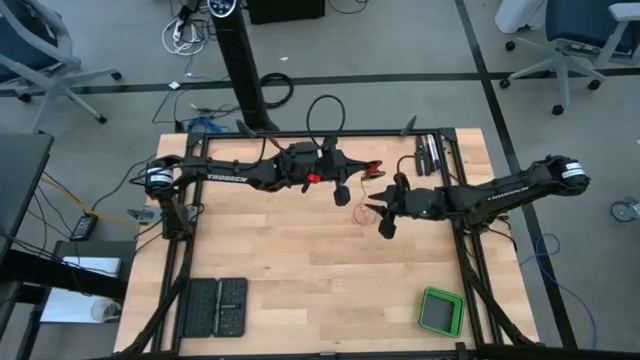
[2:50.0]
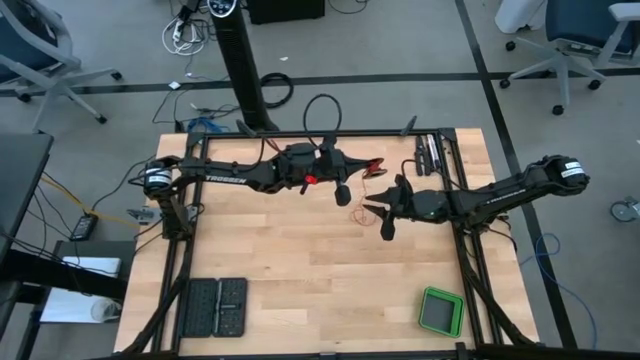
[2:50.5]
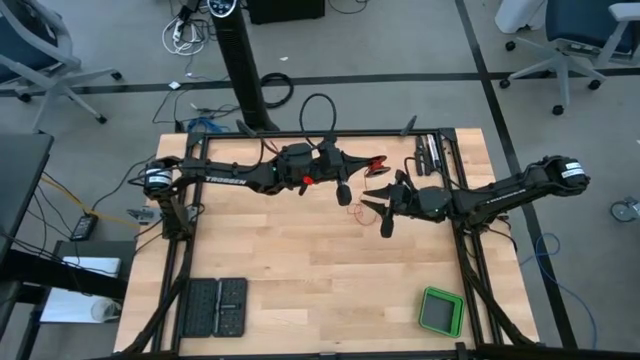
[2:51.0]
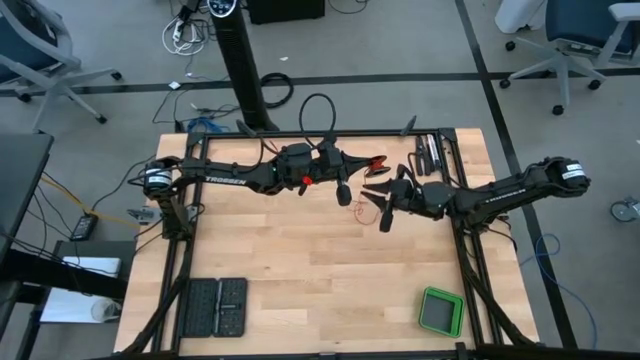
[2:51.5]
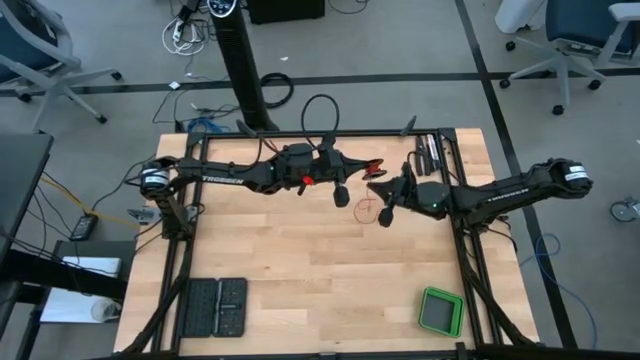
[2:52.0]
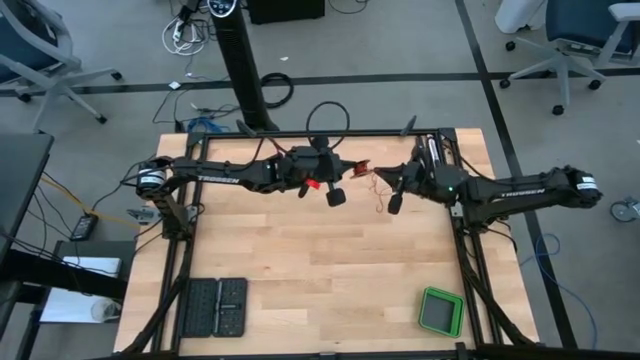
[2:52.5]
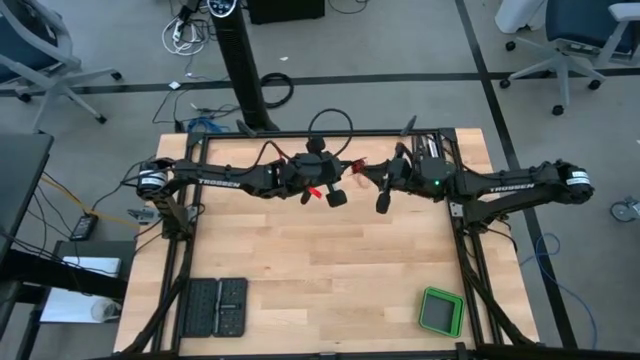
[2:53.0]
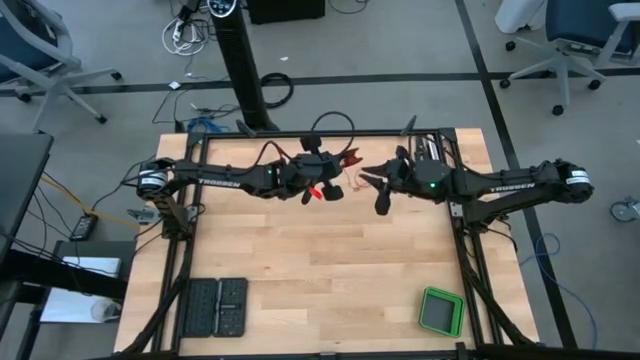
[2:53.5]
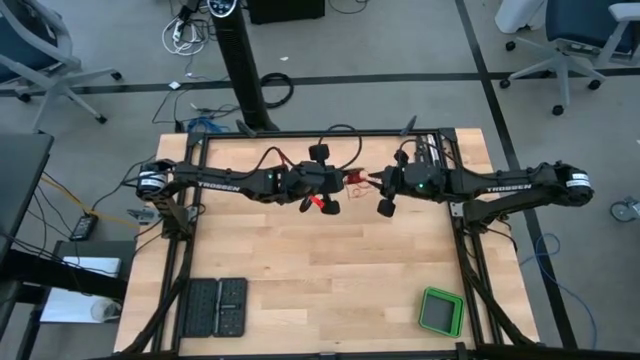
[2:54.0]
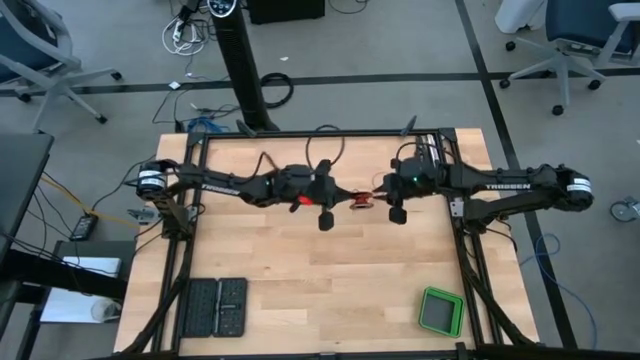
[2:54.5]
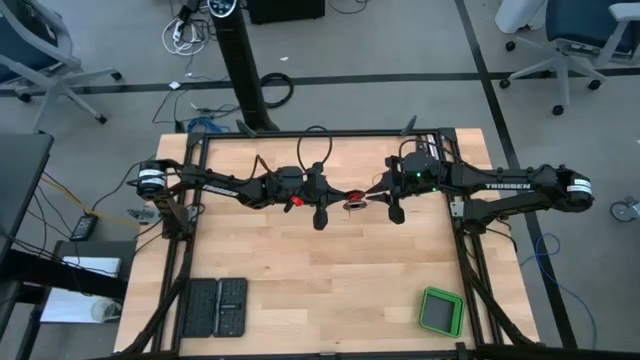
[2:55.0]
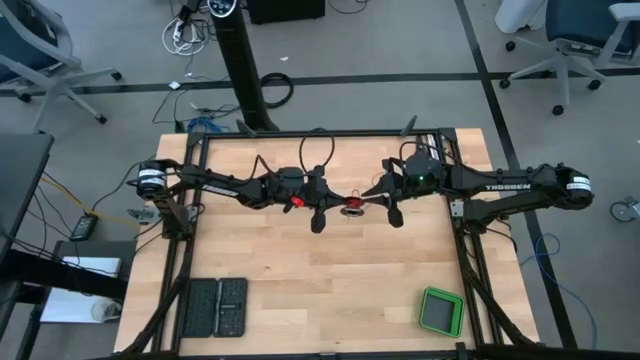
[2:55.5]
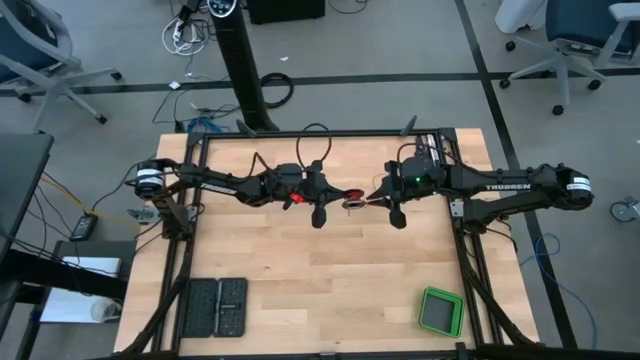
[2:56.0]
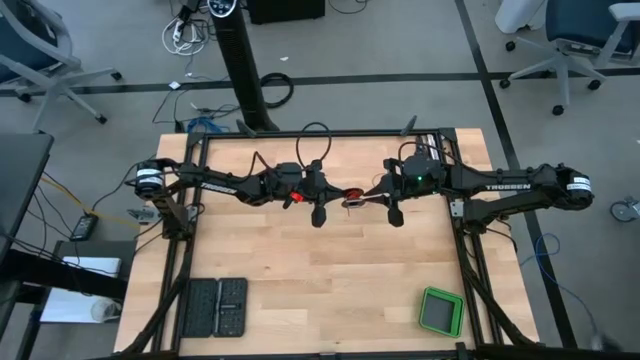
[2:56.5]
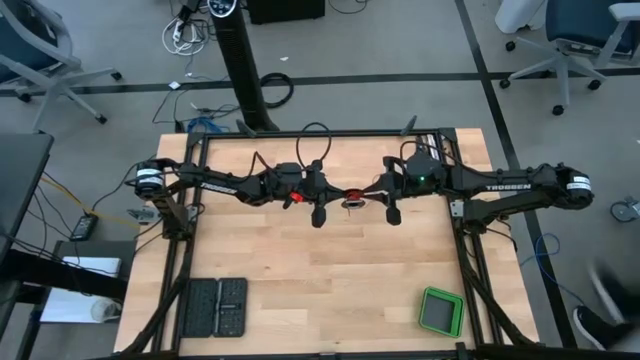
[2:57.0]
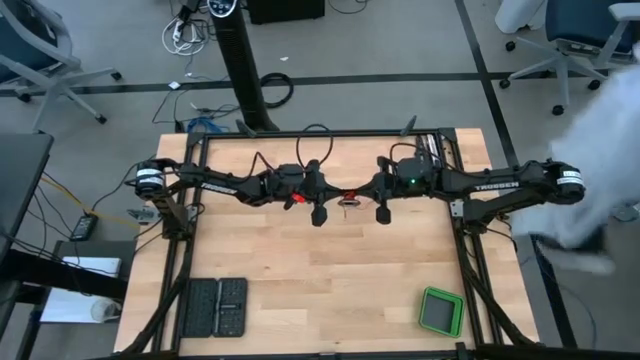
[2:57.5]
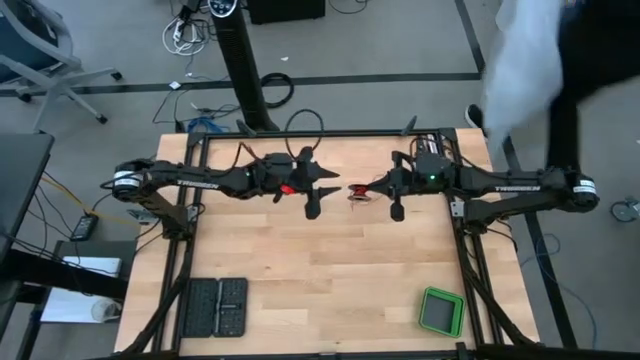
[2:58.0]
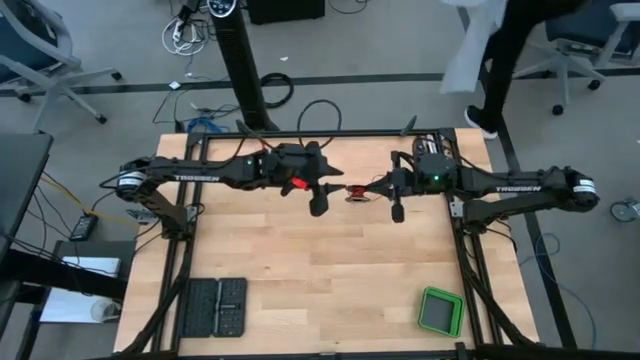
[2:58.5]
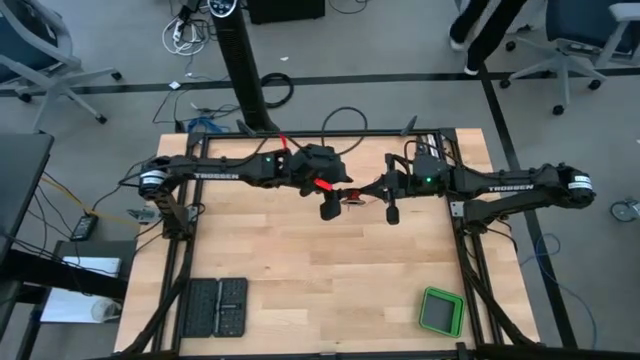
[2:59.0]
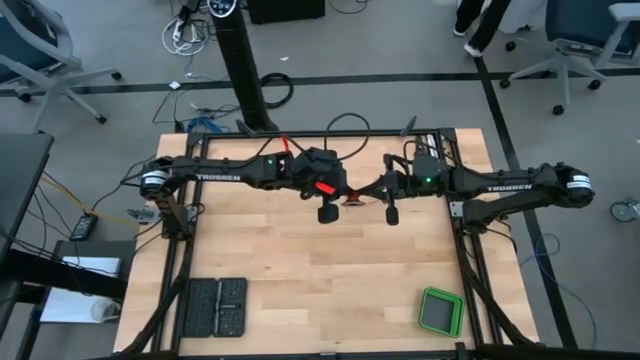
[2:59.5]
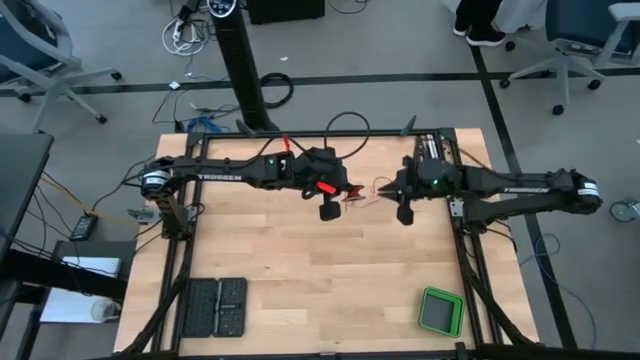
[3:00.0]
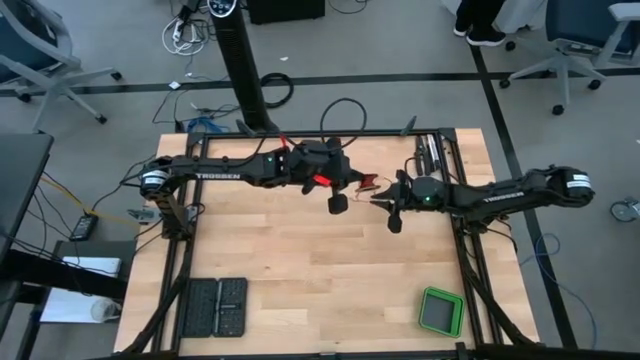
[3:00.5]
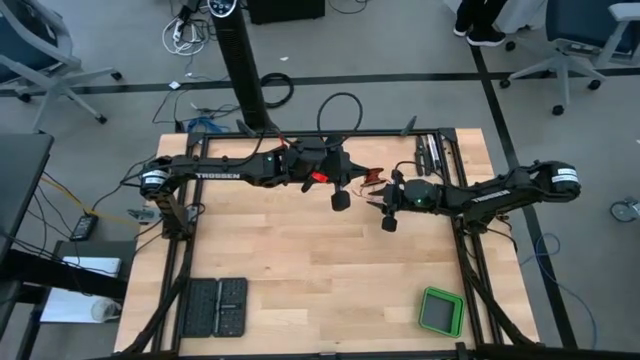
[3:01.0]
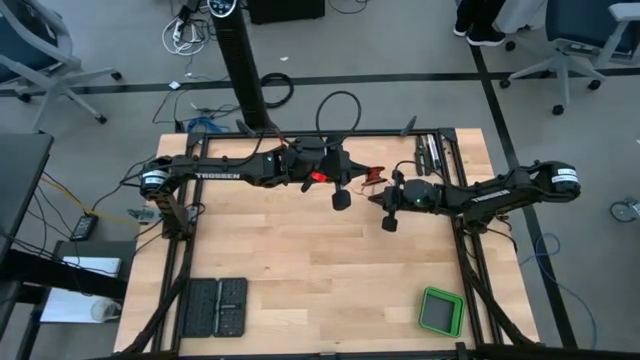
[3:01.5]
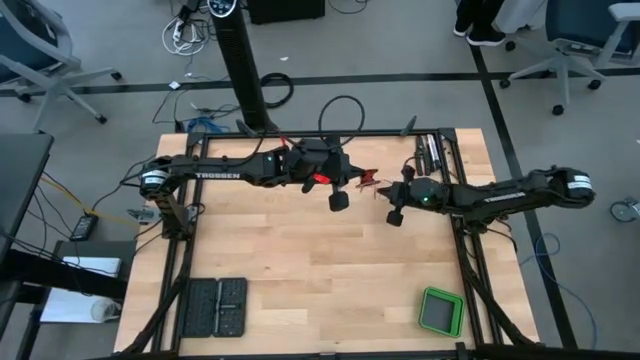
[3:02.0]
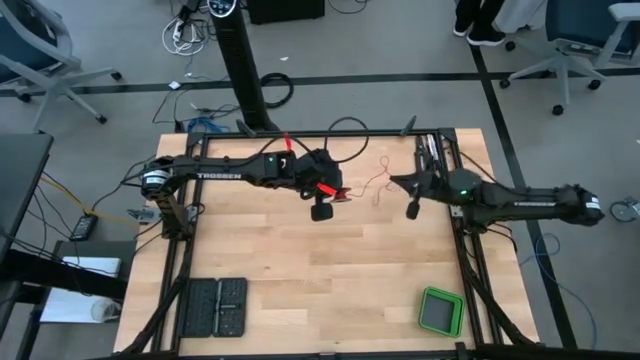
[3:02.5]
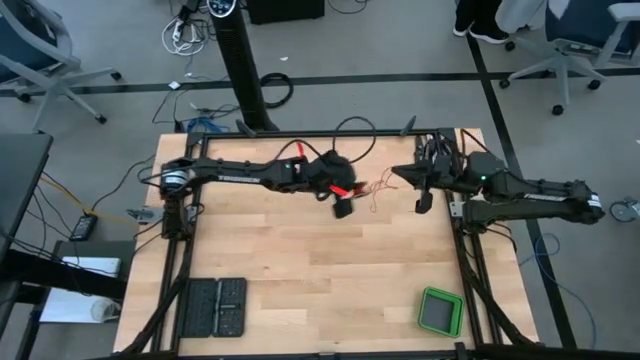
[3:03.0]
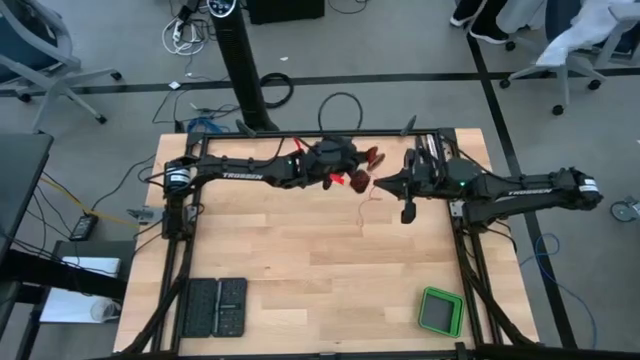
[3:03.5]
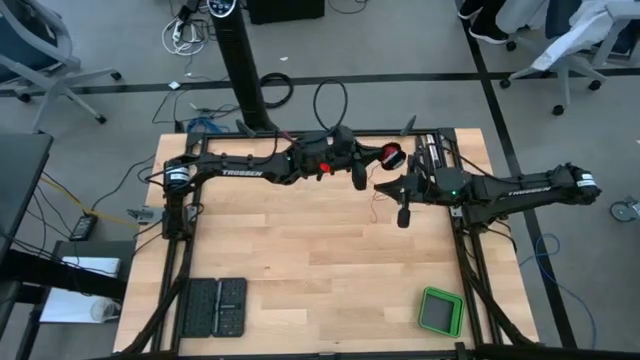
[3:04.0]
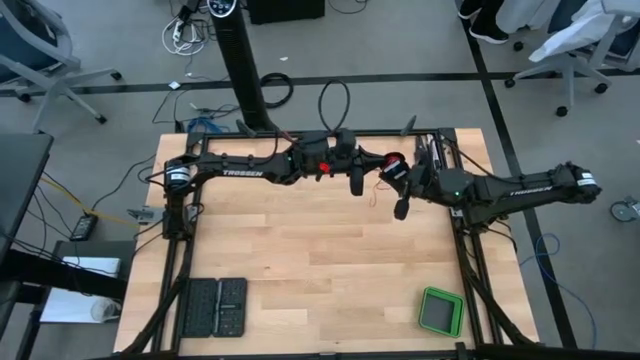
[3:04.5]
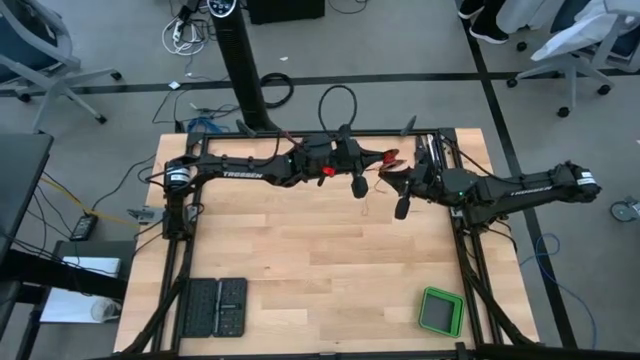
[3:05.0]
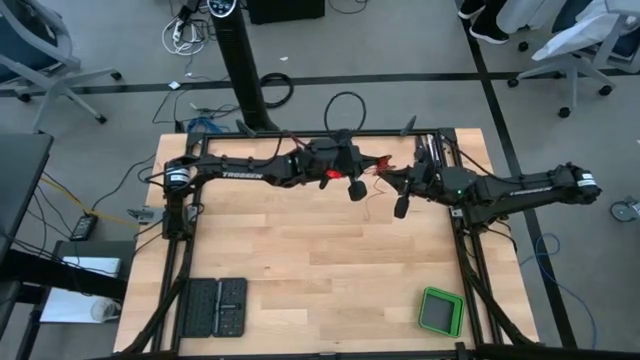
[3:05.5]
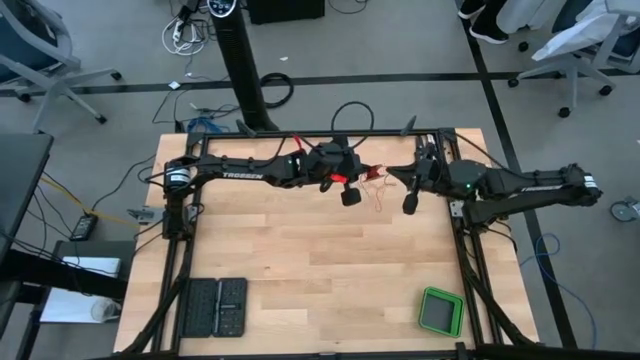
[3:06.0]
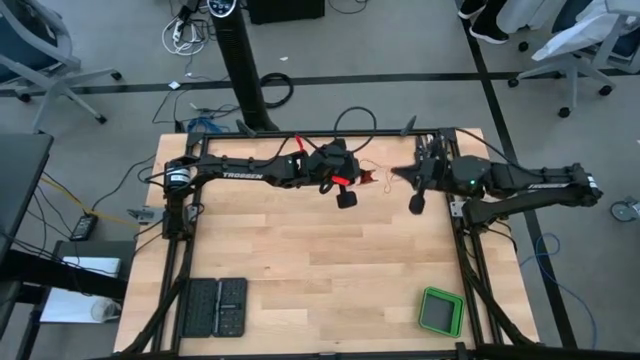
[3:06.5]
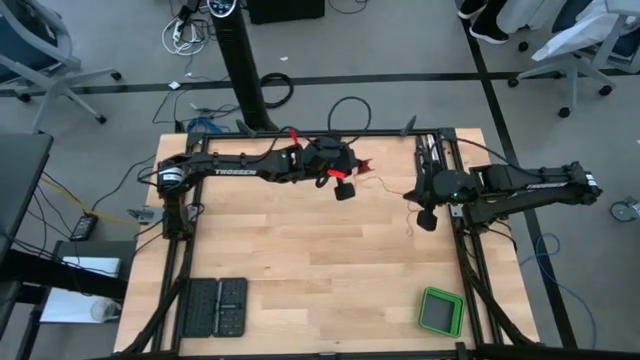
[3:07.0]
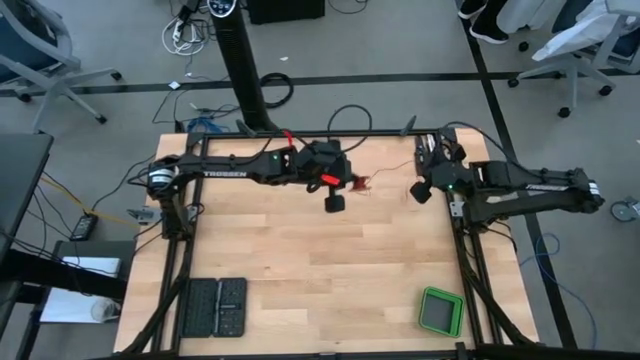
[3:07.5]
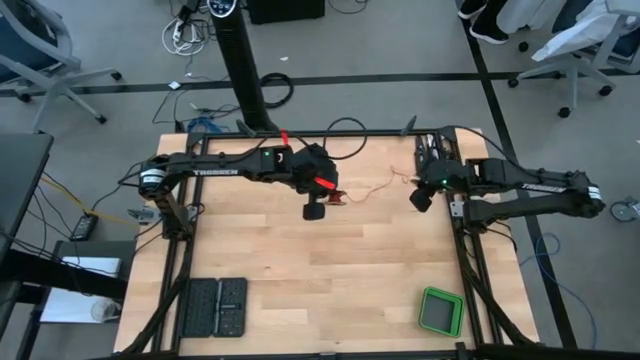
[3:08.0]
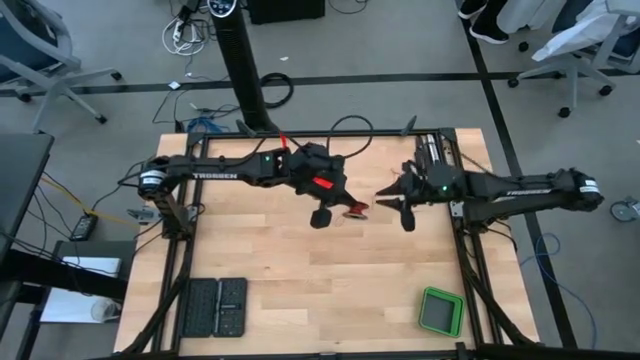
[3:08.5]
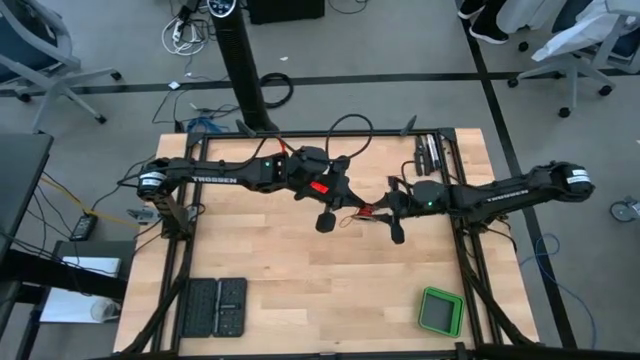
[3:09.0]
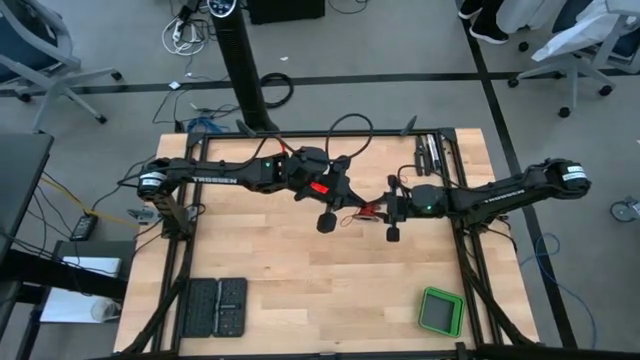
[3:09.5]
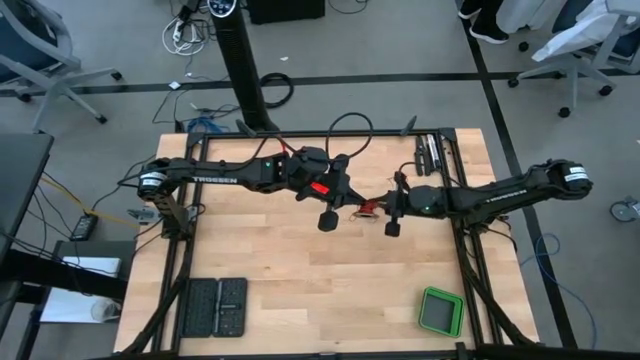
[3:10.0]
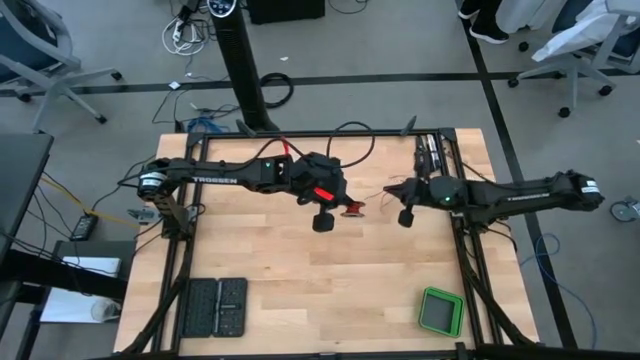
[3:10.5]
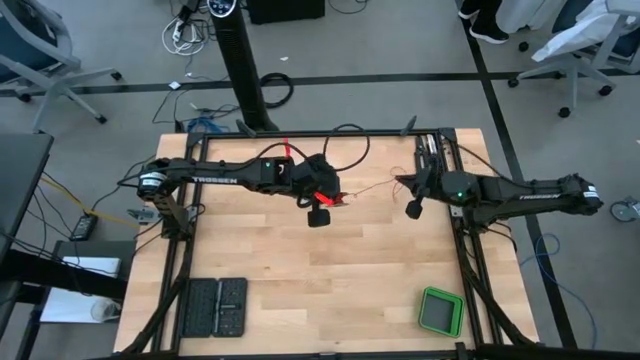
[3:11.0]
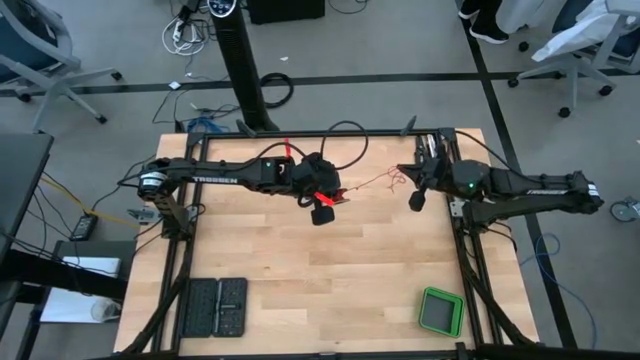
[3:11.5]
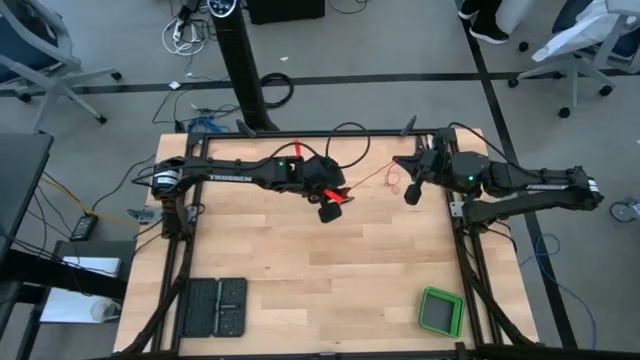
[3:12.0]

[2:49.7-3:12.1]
Task: Coil cords
Coil the red wire cable onto the black spool
